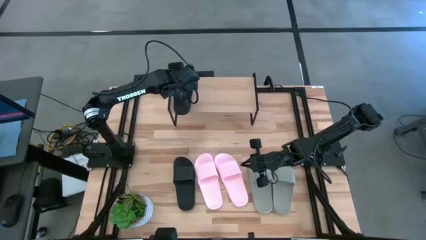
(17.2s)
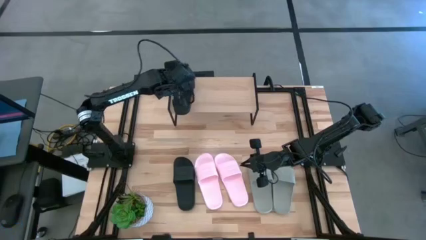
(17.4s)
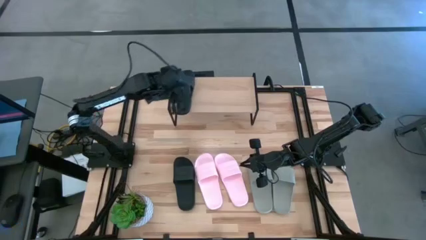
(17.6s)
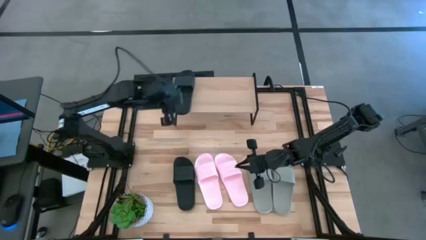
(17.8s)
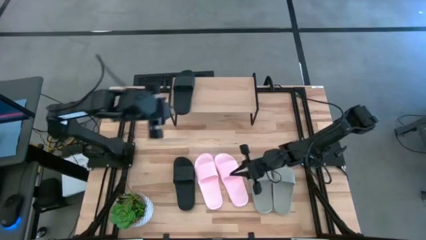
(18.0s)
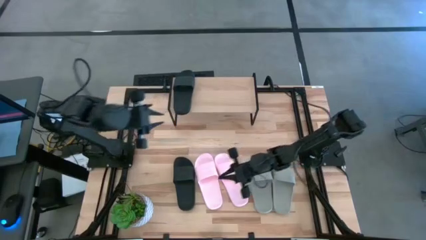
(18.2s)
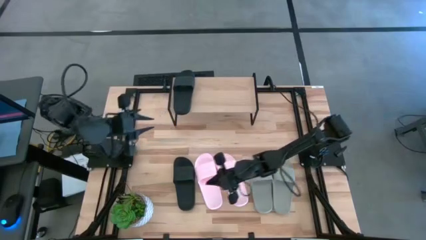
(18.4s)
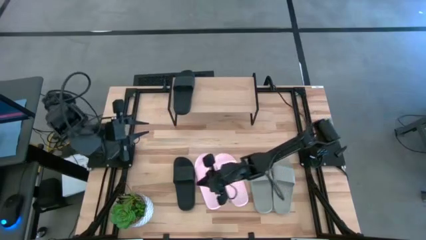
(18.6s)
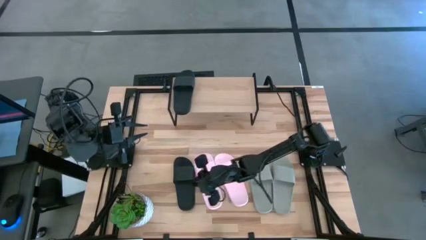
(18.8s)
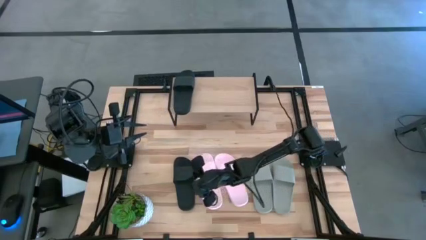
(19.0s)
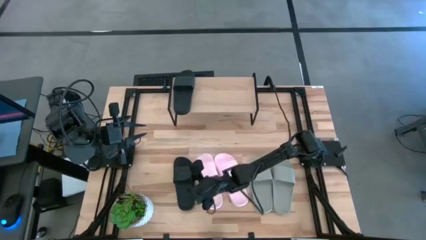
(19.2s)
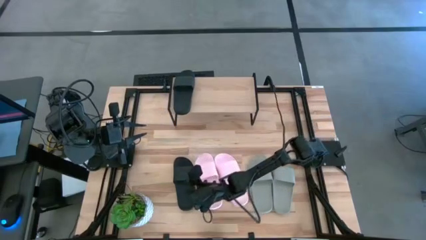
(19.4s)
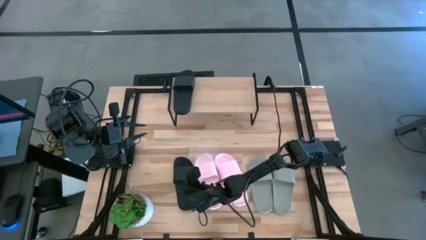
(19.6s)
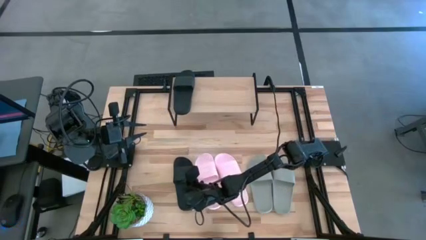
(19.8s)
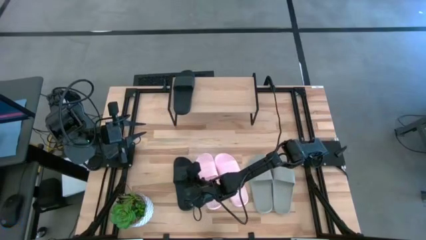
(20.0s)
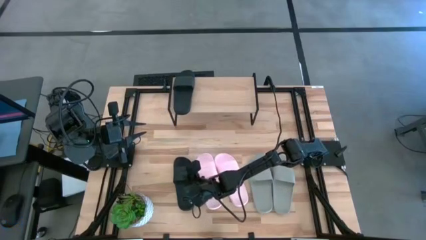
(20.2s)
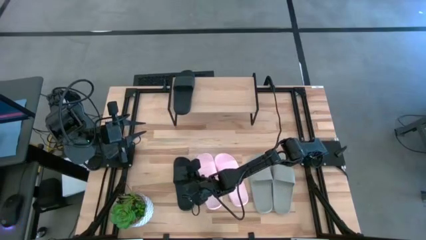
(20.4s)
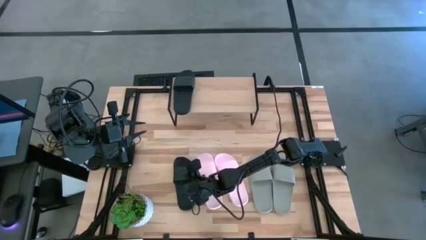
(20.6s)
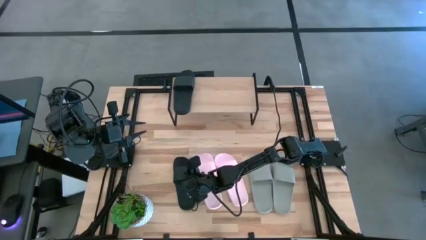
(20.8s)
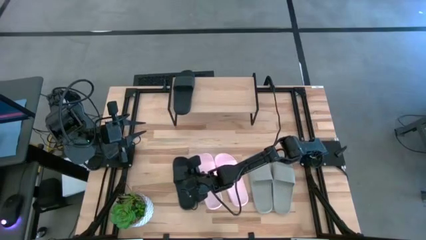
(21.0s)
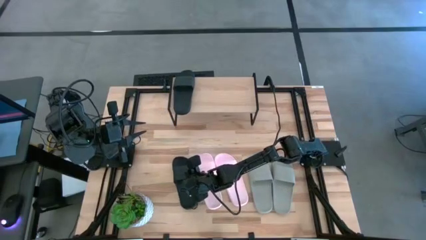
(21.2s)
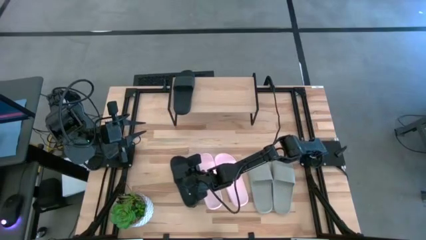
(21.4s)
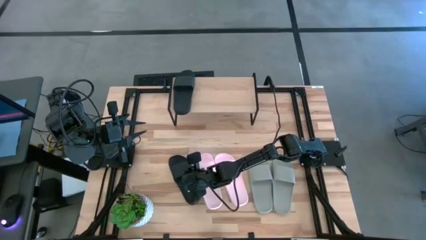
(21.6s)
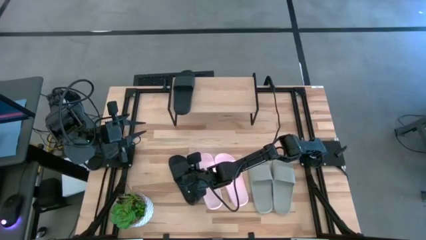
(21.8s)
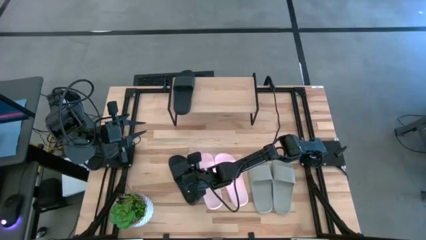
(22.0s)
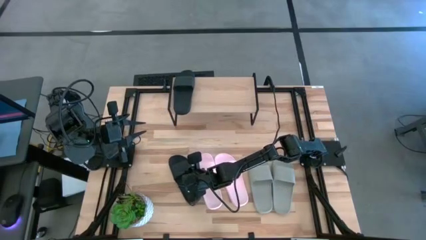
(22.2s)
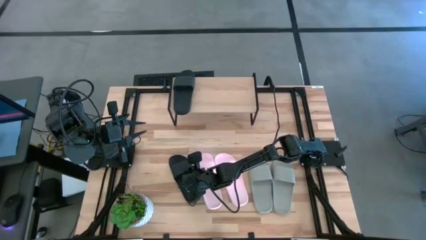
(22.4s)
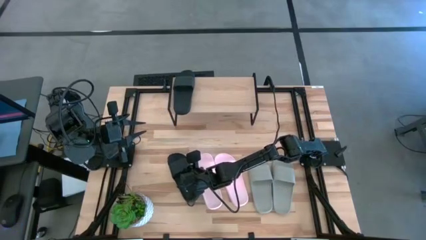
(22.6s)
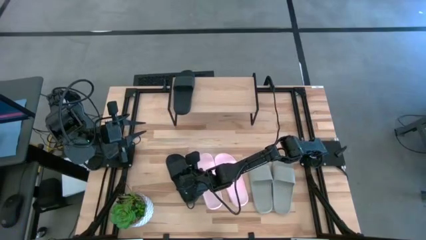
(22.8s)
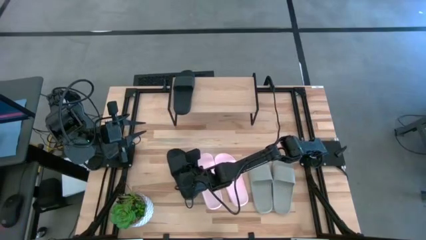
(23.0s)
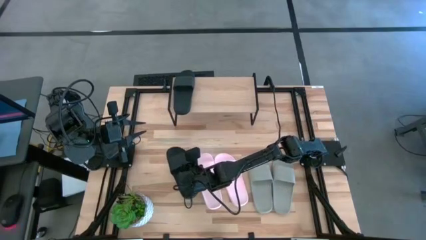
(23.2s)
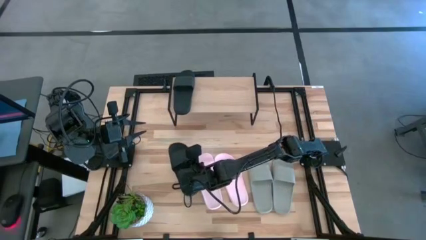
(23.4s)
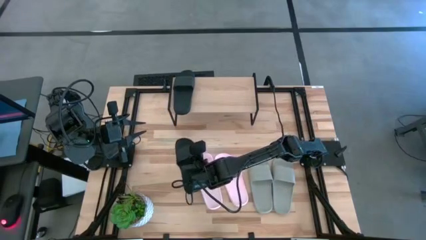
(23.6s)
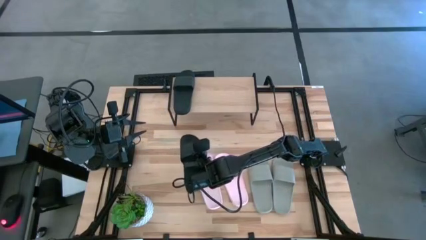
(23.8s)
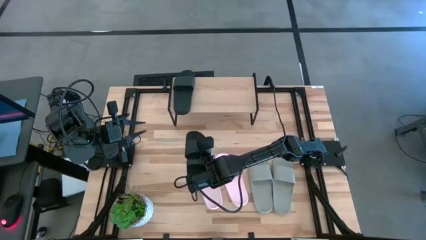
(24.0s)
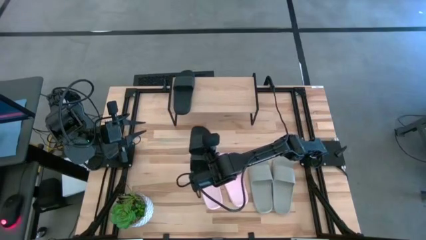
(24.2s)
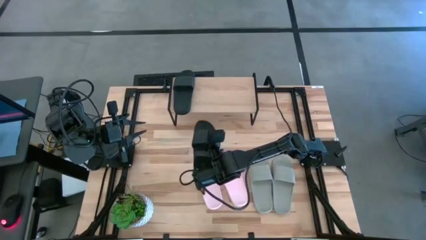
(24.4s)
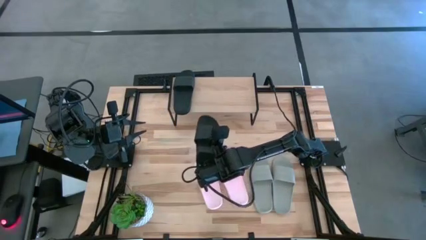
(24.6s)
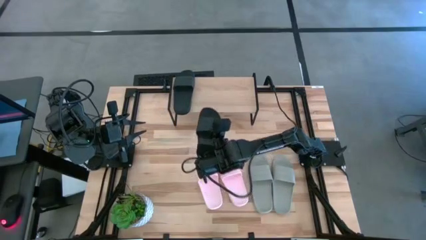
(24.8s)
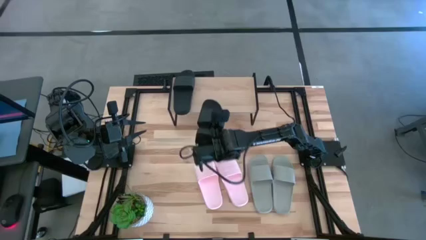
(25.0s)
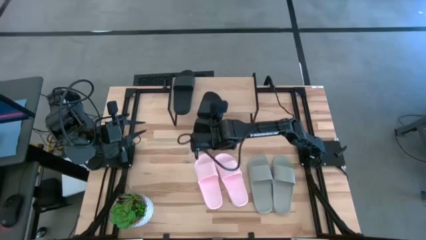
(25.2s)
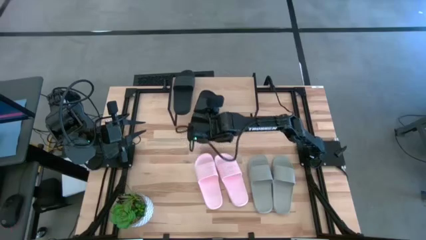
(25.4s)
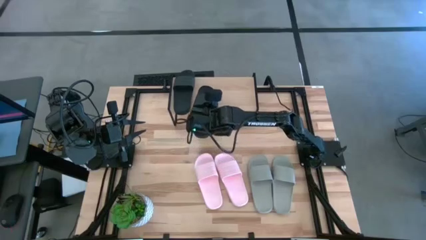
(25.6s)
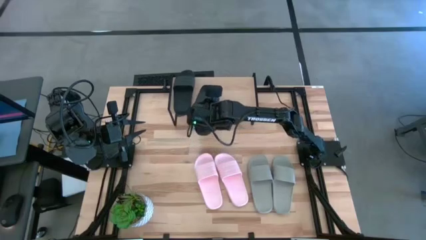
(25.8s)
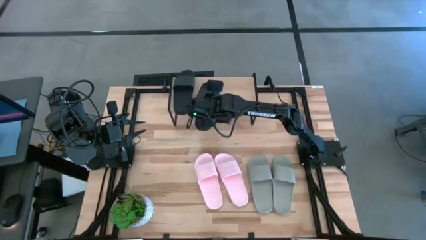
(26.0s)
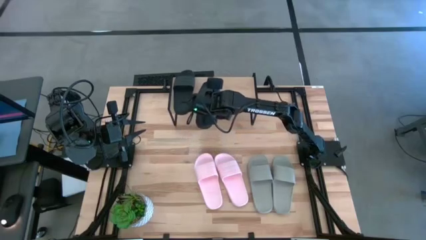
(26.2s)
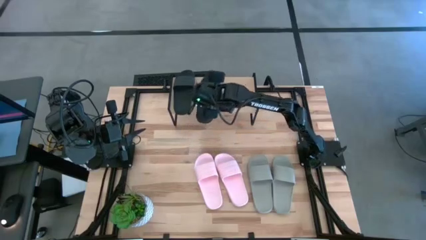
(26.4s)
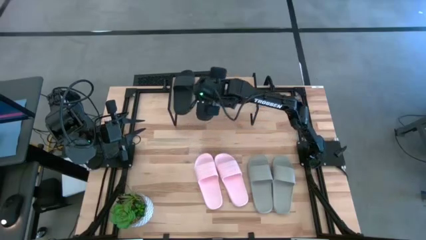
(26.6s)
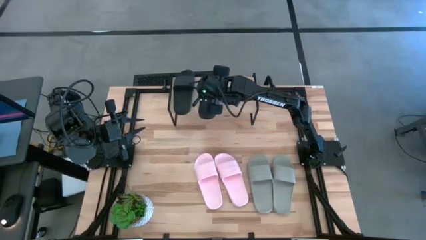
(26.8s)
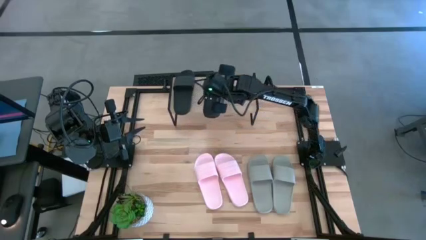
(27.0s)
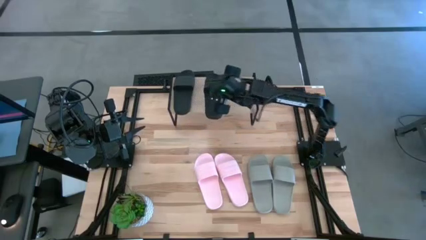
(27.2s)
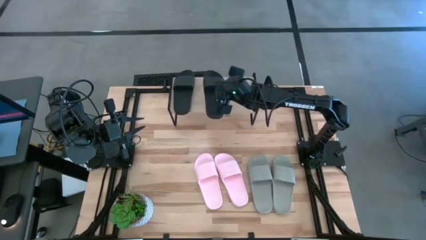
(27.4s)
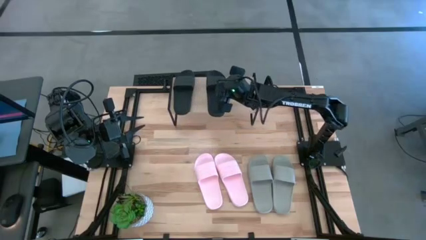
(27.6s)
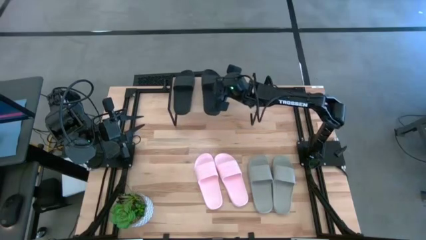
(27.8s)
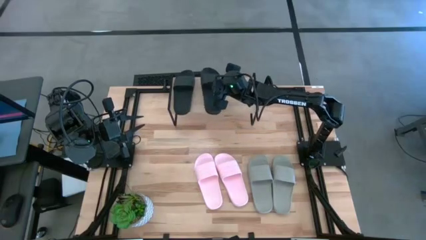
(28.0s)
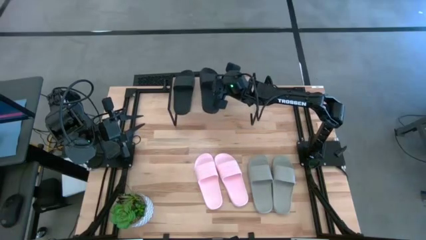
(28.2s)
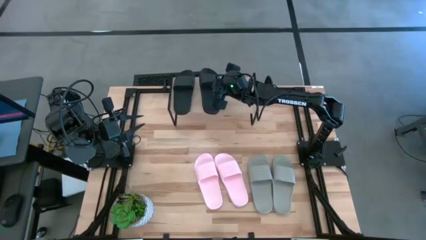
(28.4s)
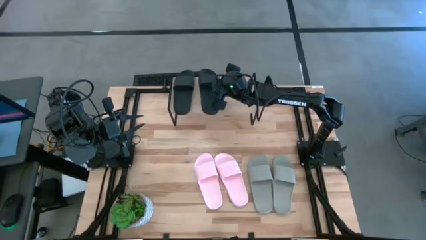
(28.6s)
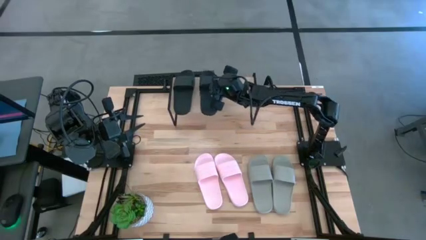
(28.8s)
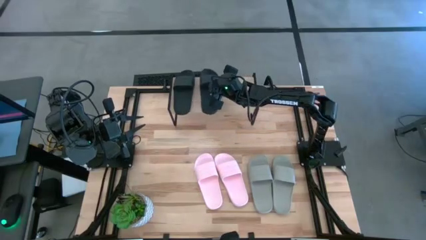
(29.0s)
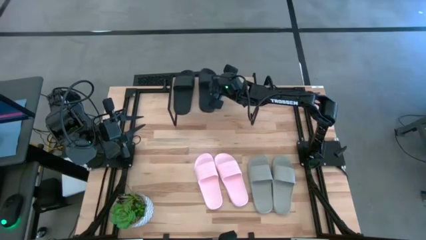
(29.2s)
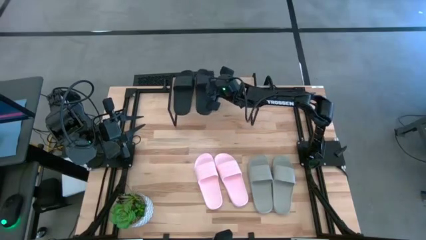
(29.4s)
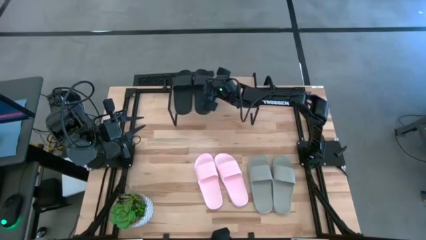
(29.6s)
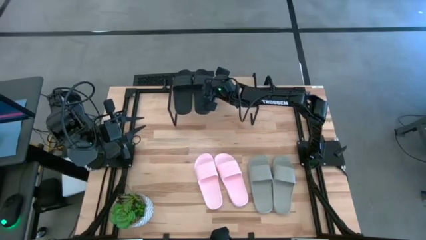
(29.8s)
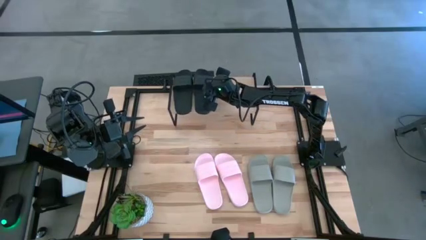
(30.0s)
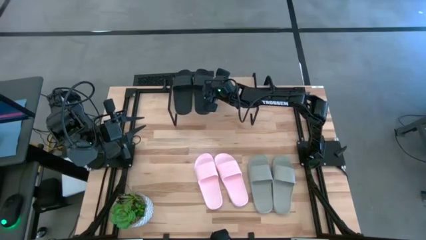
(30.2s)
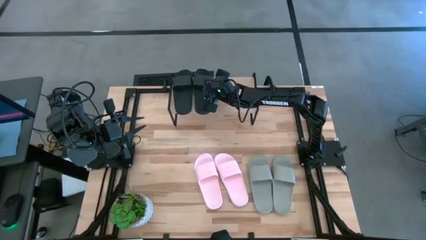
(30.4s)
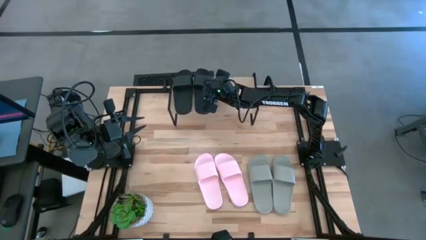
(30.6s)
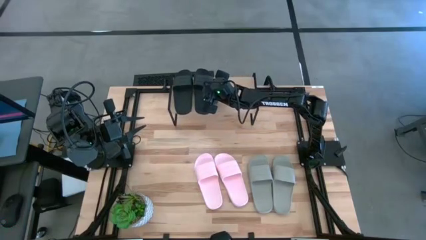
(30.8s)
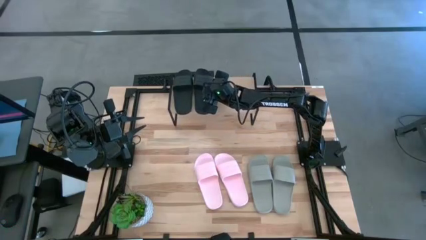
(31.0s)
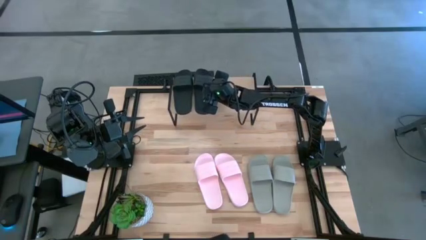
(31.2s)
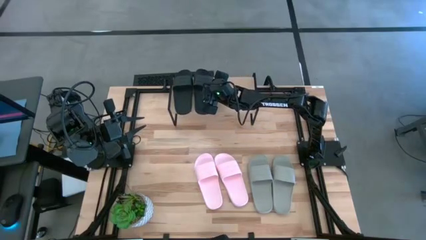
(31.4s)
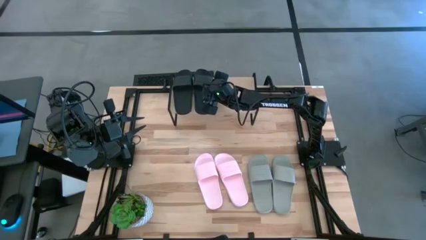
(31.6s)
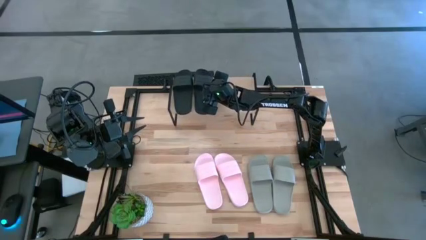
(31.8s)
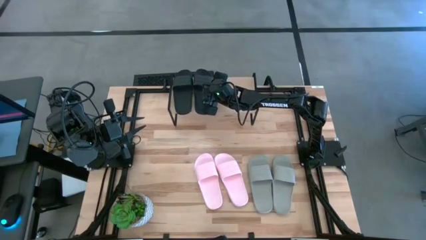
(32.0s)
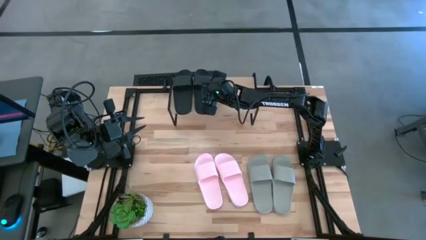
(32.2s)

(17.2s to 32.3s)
Task: Pick and place slides into the shelf
Put the black slide on the shelf
